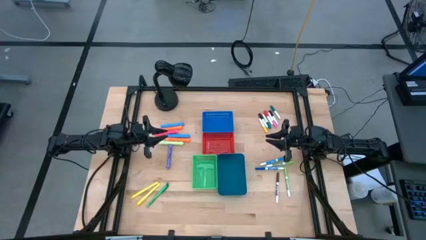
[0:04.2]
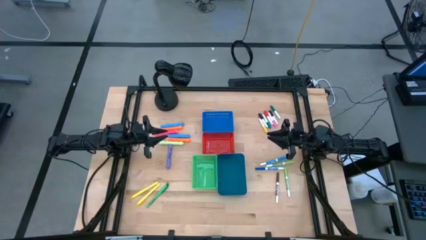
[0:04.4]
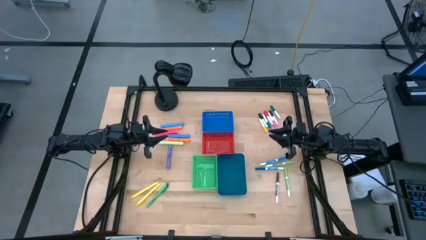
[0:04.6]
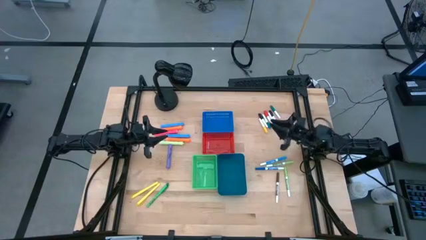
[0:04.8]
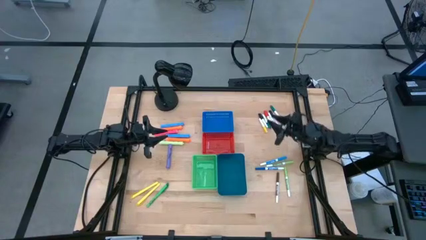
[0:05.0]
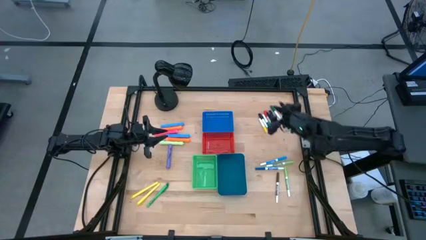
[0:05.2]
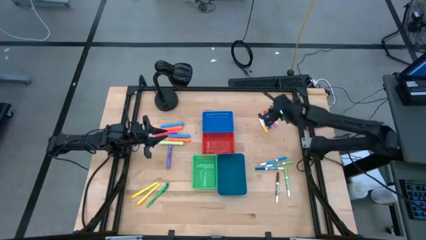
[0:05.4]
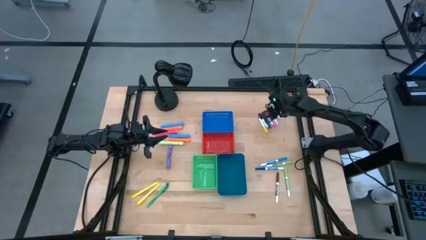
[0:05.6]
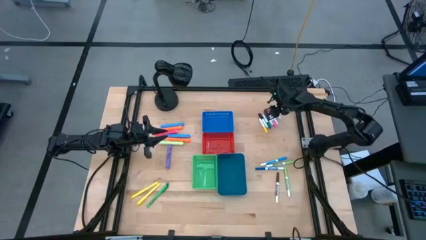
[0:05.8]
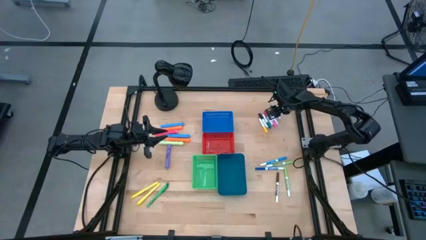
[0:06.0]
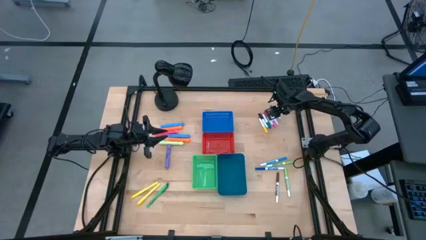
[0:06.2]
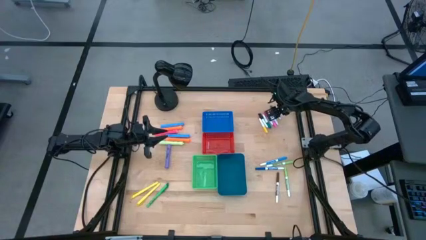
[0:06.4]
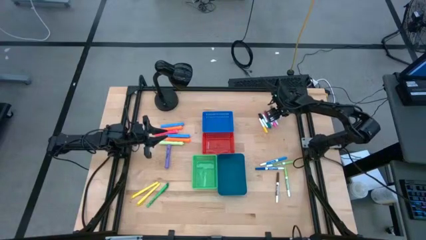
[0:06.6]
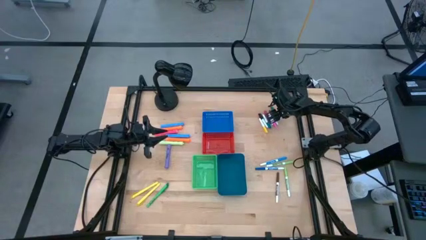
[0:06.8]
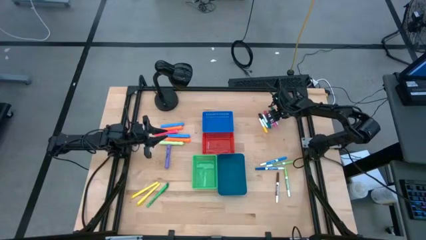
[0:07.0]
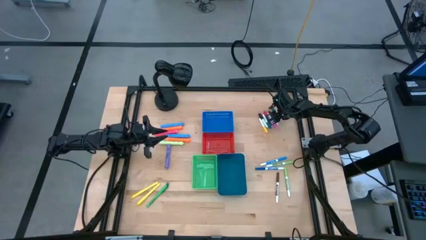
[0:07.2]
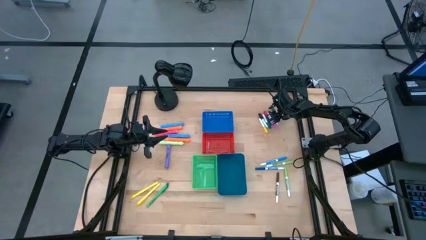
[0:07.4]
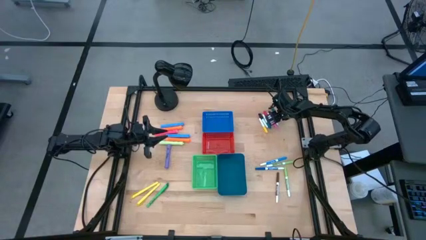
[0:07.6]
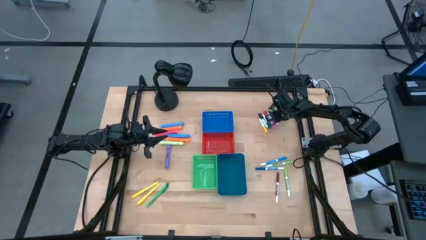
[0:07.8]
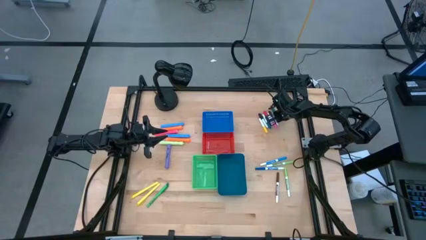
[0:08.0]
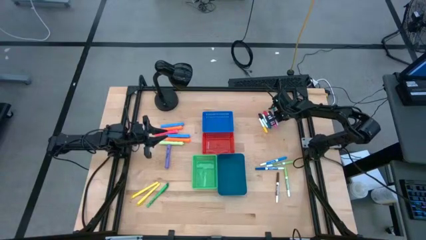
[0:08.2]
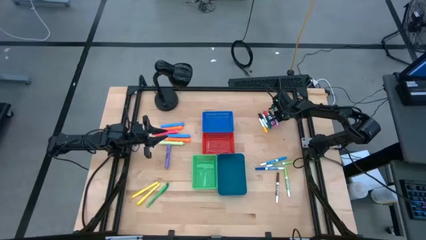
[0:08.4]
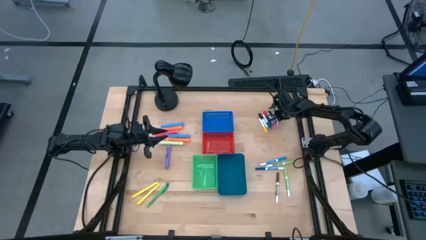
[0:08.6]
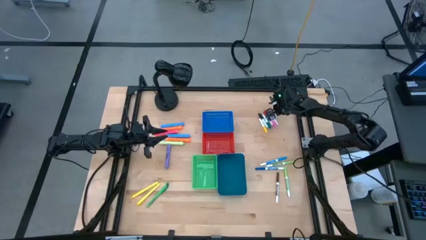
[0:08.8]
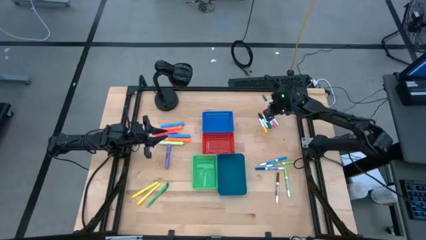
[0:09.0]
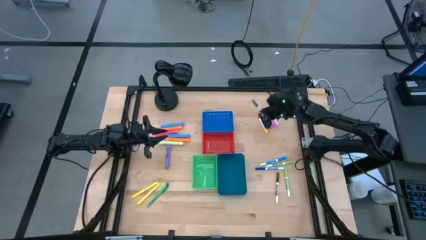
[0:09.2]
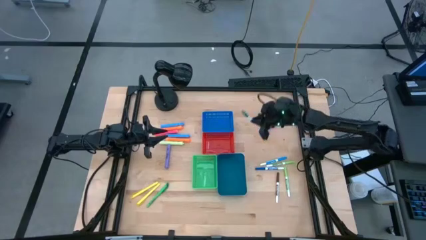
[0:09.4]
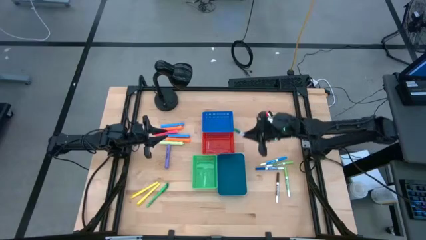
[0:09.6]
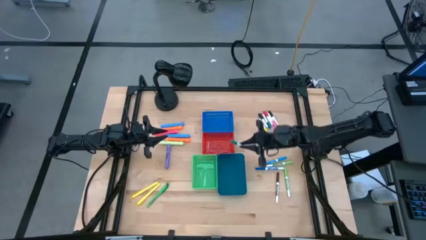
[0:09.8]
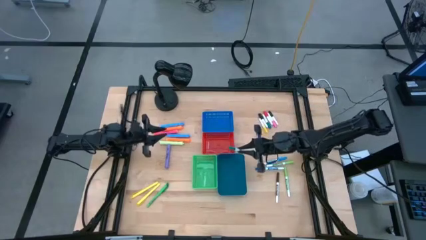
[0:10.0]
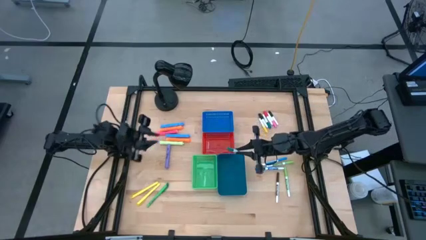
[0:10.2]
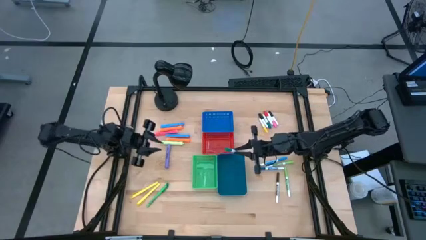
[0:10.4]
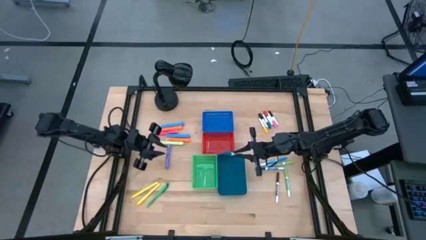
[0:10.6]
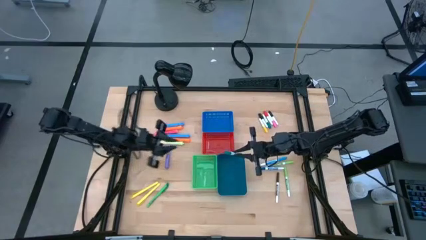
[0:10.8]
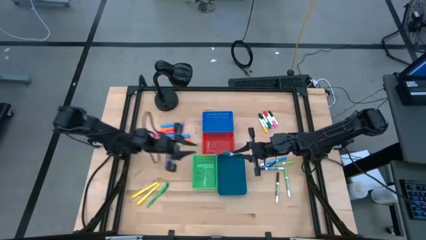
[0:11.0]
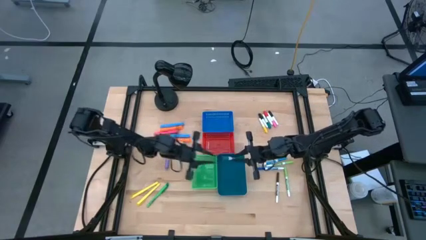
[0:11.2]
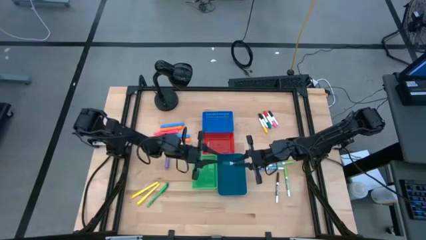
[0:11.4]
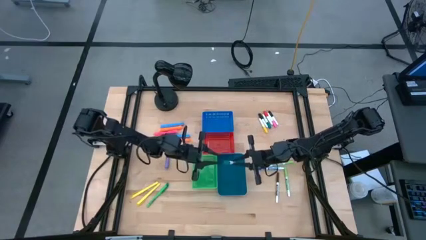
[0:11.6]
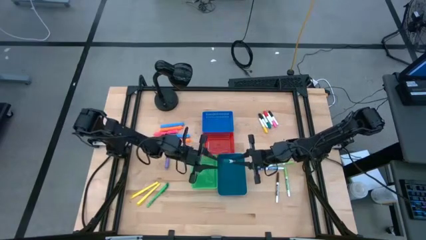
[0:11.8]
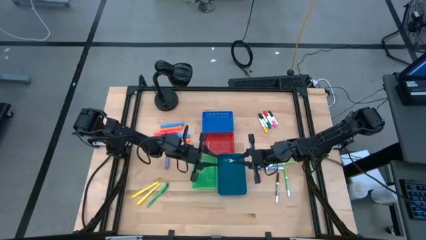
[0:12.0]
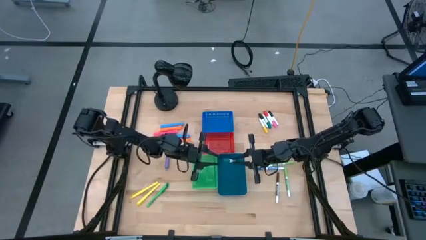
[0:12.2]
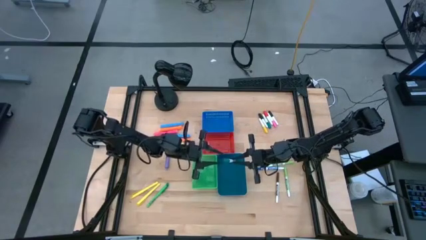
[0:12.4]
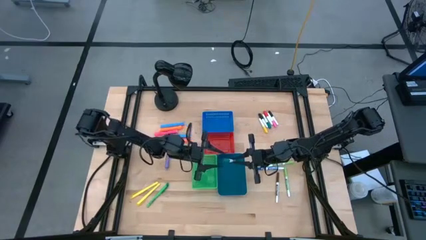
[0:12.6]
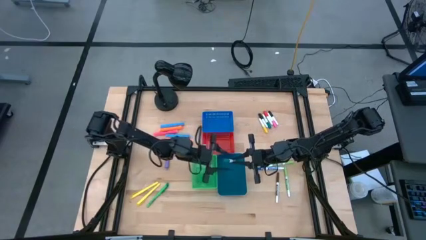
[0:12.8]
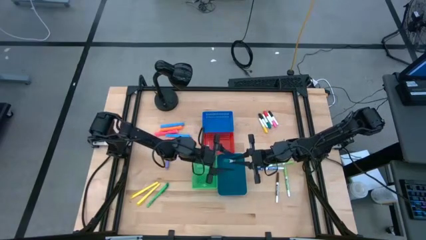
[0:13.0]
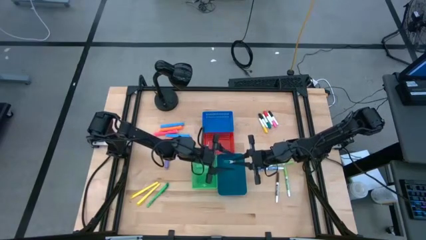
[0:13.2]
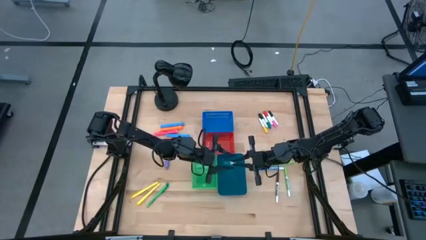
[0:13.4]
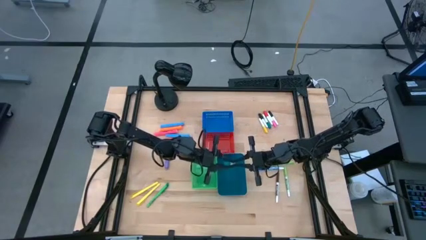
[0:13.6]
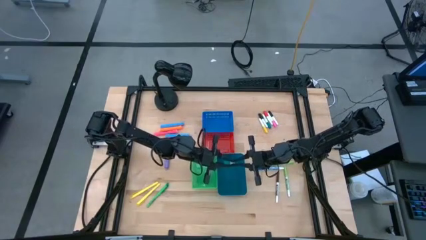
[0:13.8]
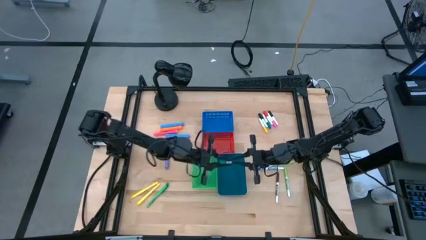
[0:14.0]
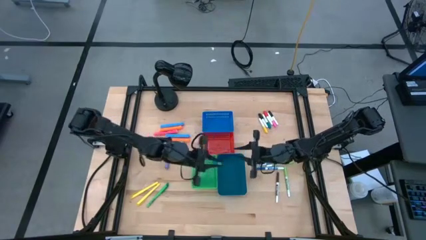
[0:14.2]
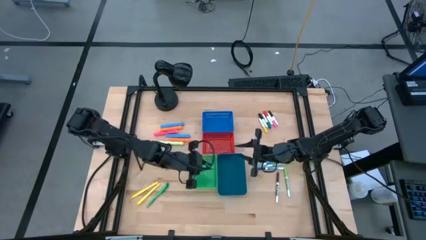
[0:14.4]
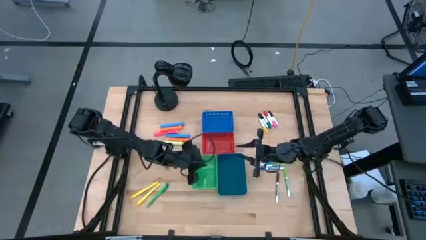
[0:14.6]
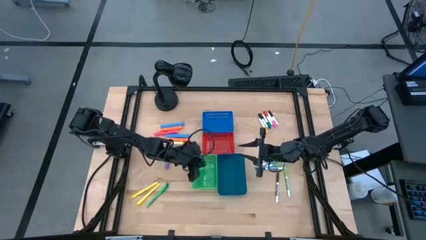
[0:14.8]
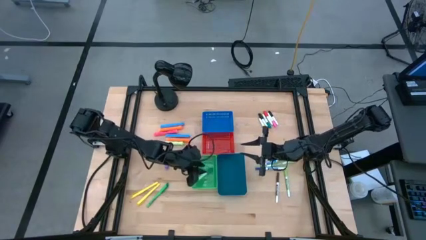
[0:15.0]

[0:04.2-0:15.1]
Task: Pick & Place Markers
Put the right small green highlighter pen into the green bin

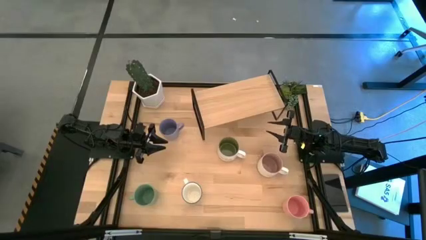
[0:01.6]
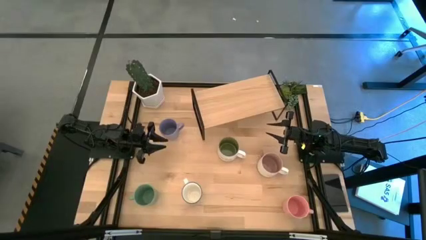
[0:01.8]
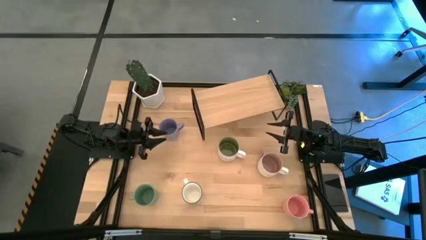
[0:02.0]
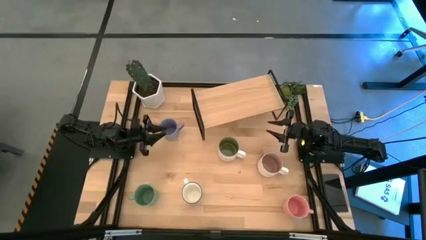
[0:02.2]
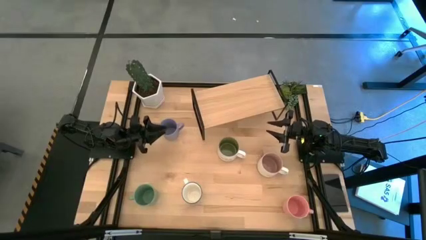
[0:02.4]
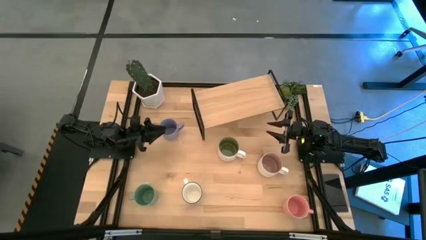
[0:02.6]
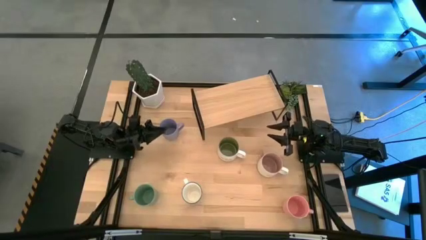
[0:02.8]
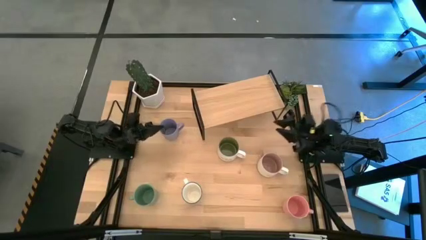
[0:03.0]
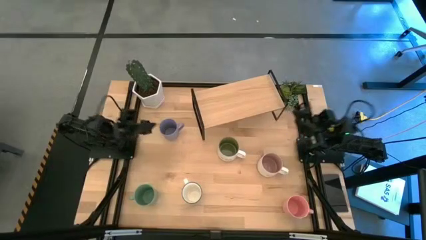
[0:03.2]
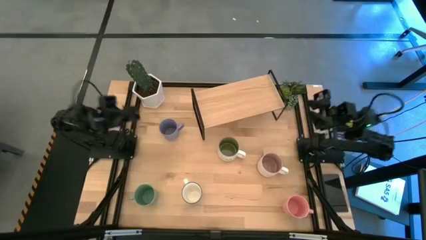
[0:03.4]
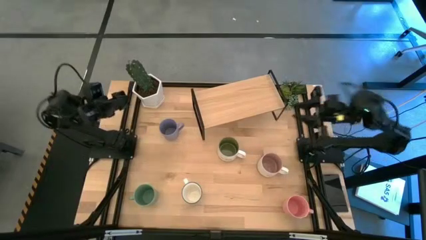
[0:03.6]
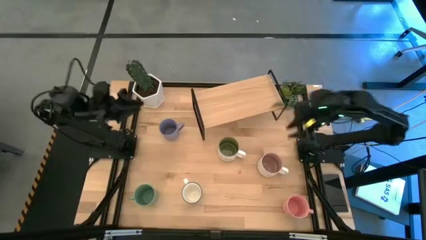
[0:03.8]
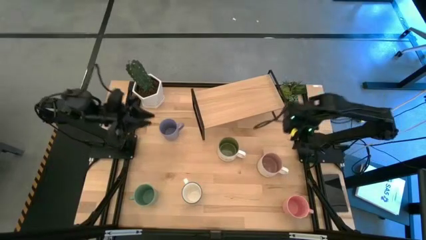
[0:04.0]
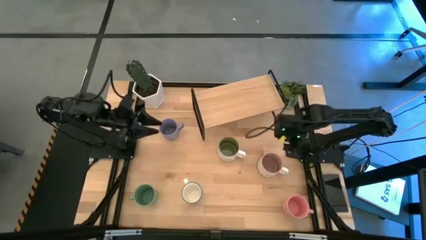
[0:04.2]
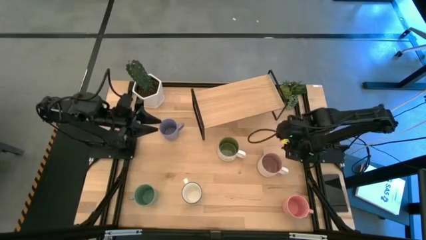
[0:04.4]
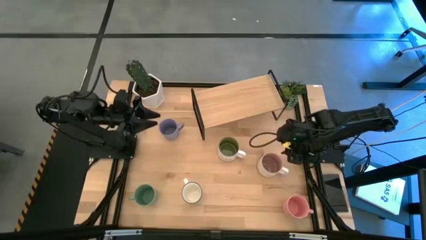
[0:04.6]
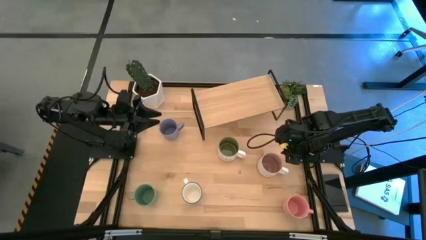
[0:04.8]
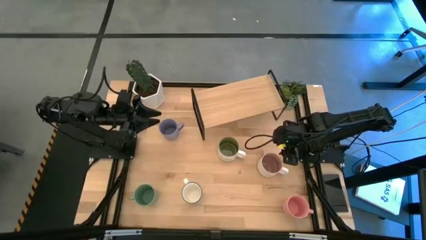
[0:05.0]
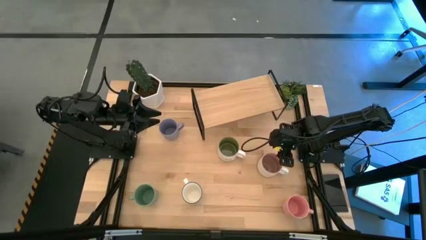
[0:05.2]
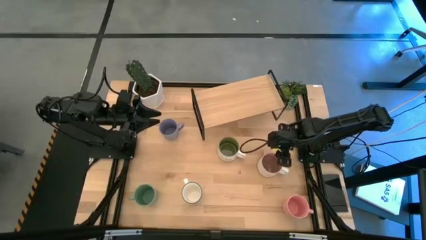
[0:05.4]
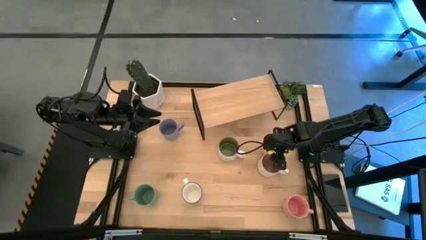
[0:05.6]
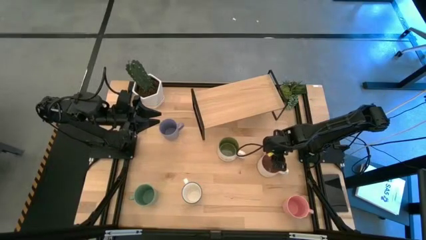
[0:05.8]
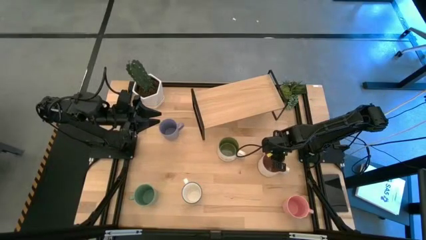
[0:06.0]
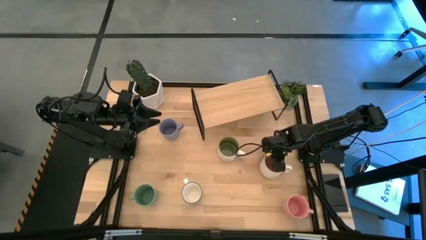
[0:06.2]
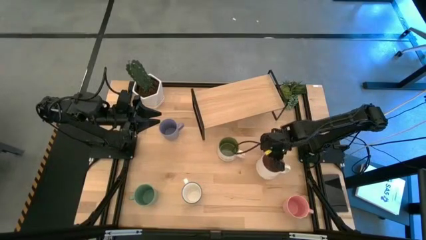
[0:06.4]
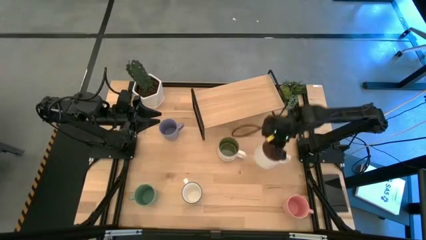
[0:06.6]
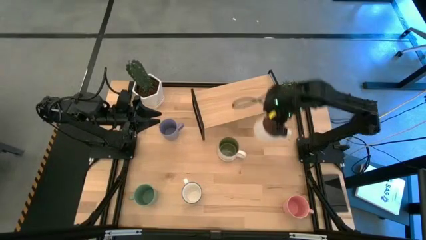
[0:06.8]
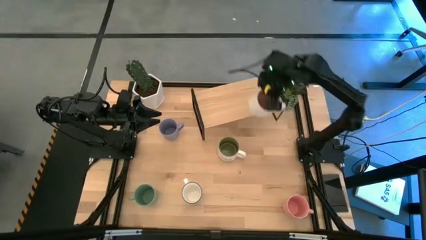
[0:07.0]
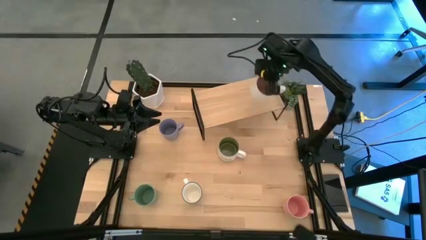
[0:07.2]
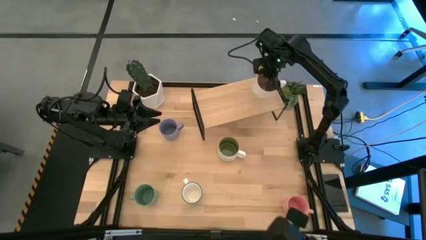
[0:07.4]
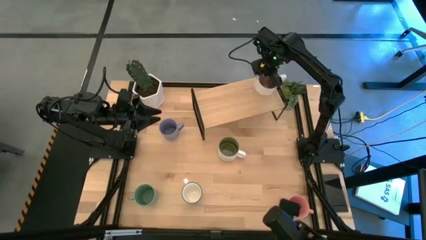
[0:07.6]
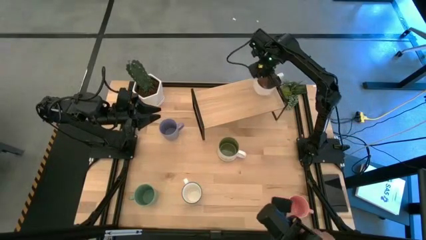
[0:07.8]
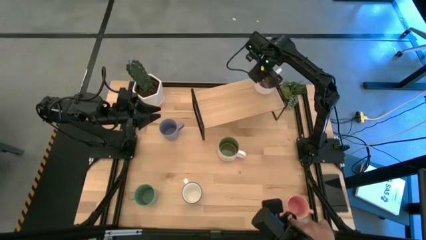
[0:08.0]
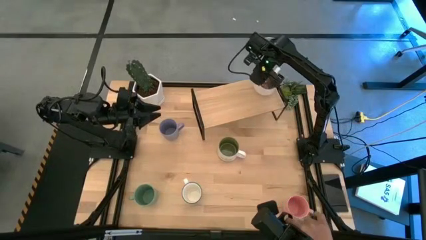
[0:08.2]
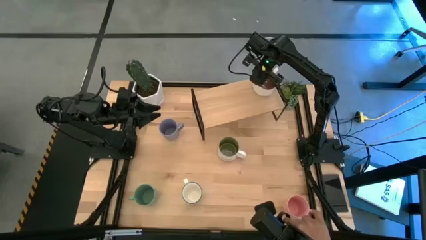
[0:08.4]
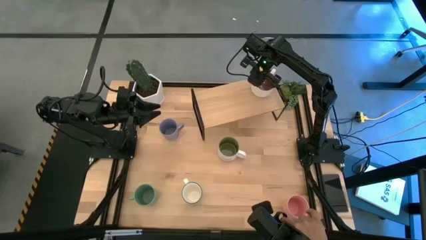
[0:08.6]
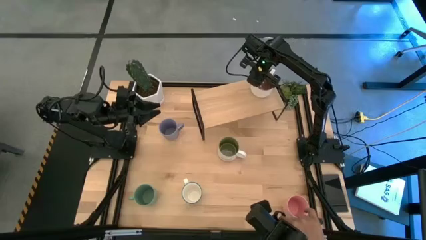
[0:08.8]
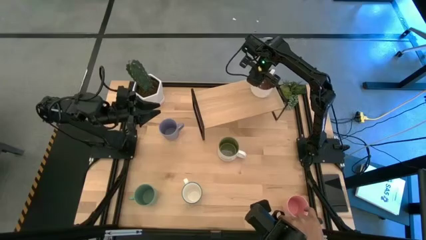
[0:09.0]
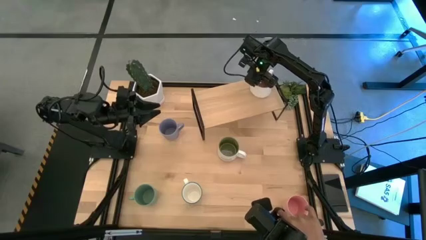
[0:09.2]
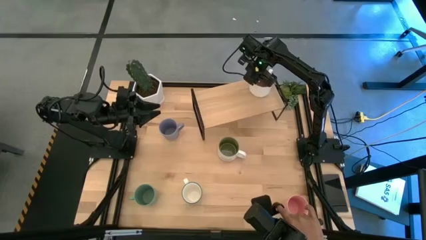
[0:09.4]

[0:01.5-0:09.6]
Task: Place coffee mugs
Put the white-brown mug on the shelf
